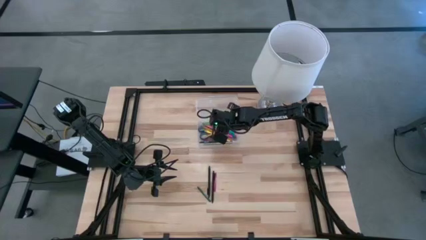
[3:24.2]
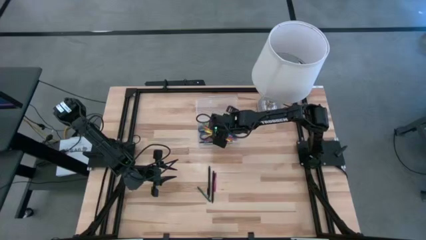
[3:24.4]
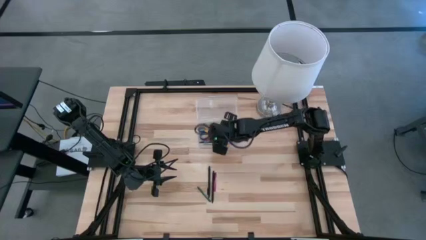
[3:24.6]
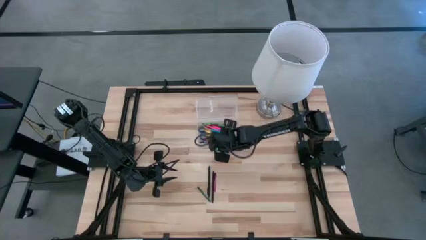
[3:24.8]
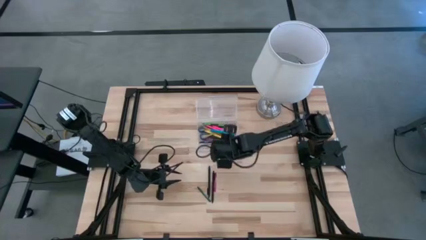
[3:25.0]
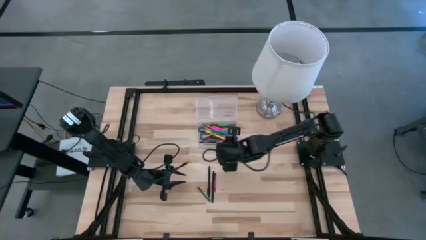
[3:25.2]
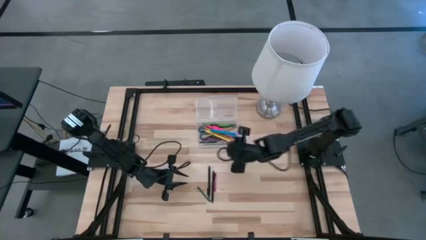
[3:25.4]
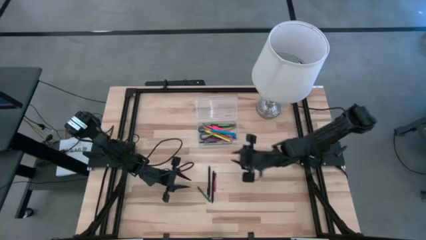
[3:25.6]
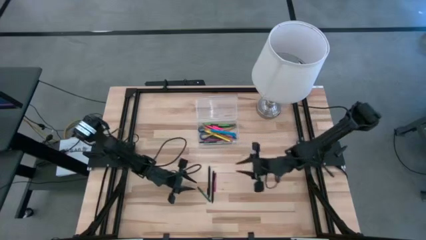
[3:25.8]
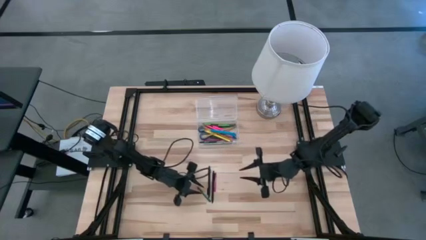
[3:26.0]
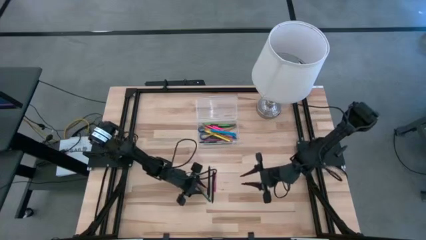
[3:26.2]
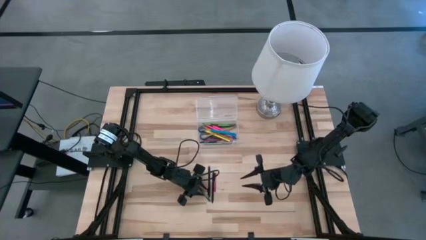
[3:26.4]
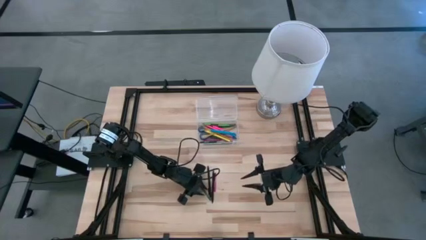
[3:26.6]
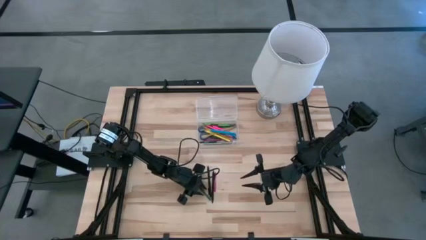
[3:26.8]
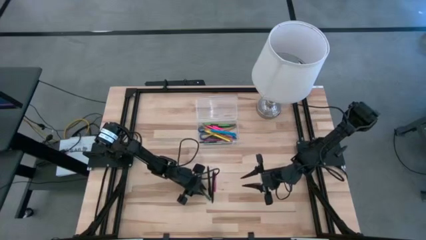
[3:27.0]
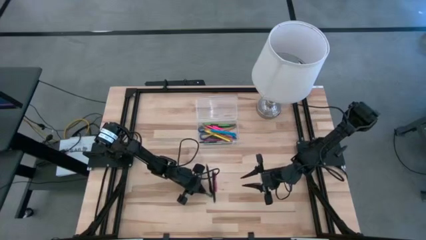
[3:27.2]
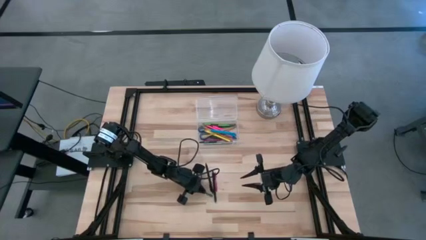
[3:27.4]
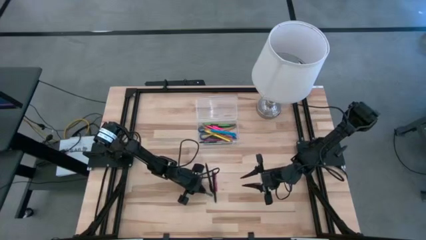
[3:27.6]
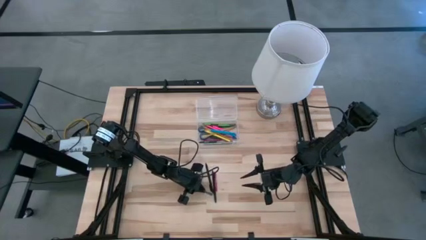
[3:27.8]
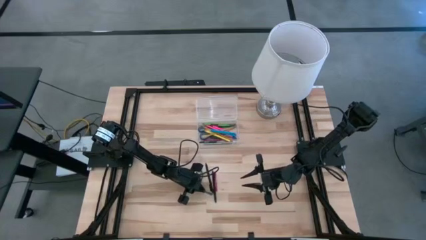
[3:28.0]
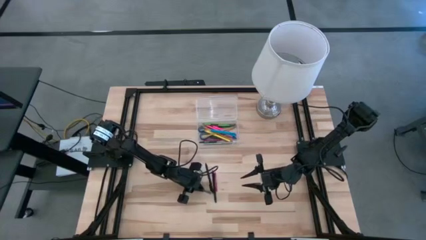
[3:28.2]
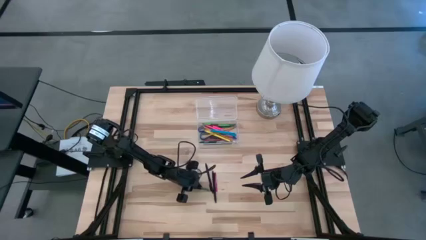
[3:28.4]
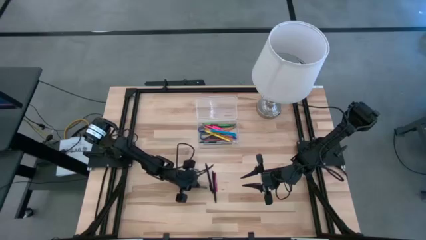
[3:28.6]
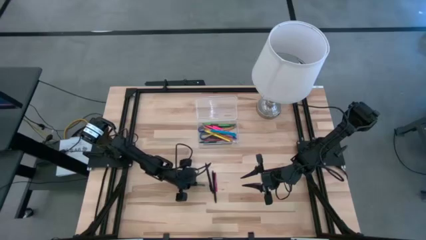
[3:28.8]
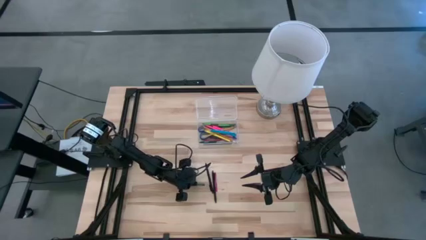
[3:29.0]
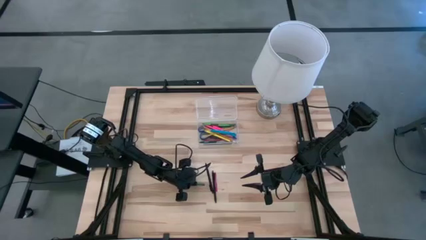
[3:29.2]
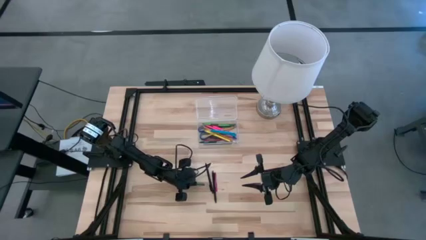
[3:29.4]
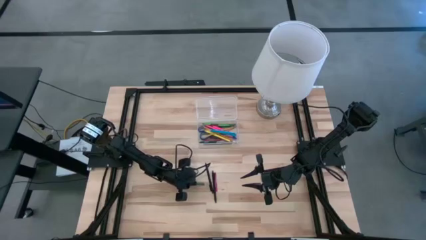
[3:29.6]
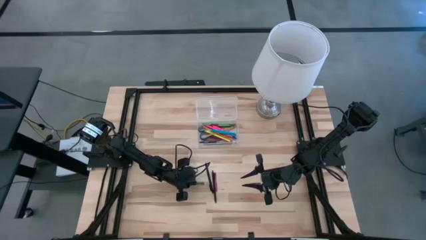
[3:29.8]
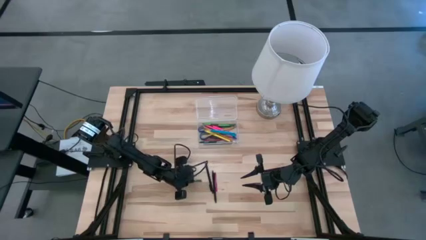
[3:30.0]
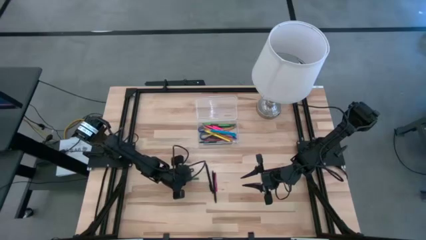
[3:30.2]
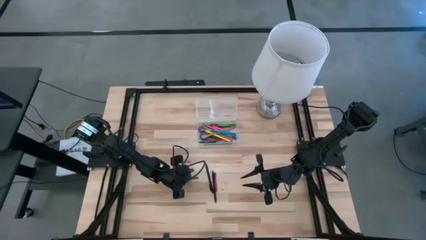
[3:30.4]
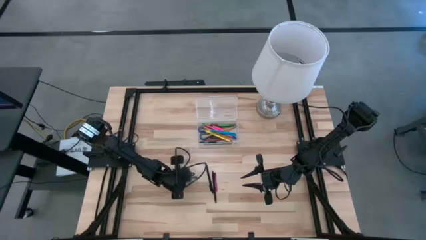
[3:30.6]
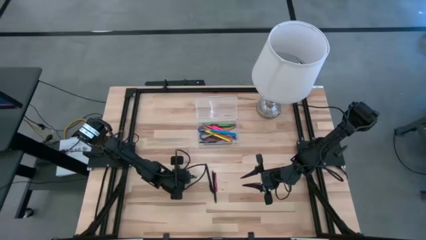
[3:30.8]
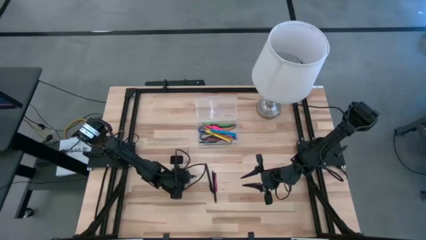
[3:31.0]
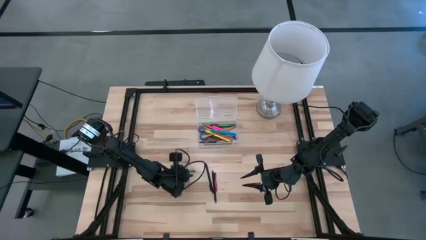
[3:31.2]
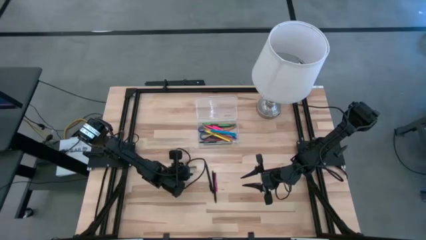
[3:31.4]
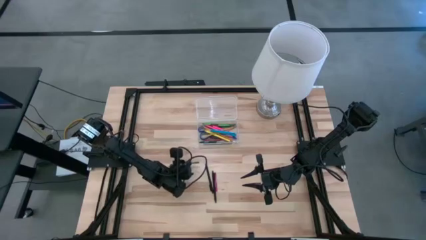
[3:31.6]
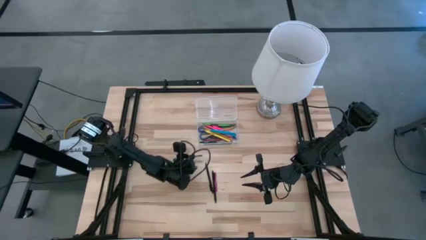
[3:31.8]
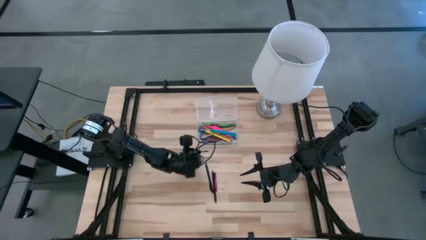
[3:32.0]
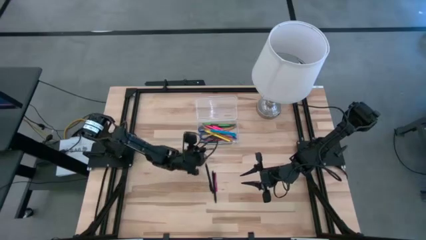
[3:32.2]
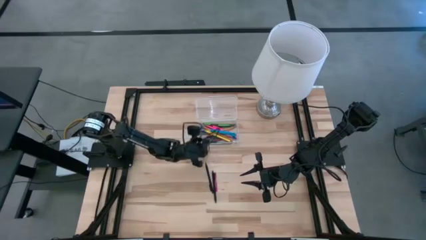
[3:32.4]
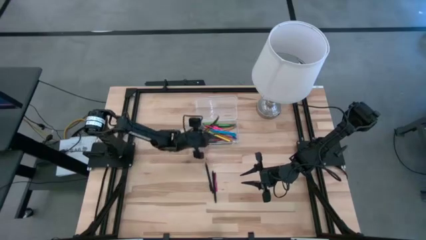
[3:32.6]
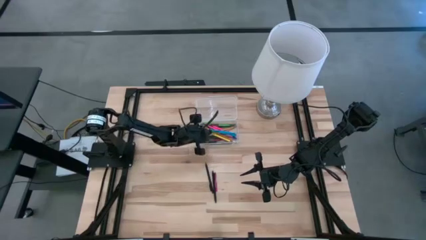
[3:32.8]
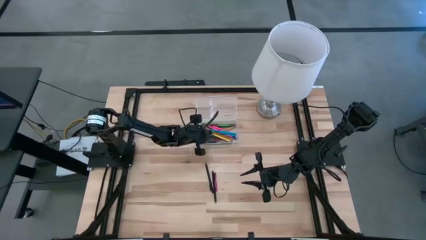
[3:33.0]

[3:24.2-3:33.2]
Task: Pick & place school supplies into a supply box
Put the green crayon into the supply box

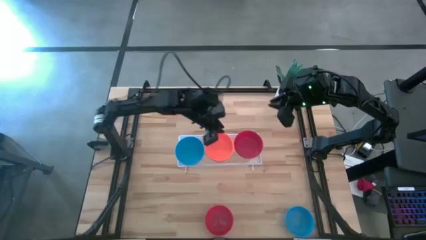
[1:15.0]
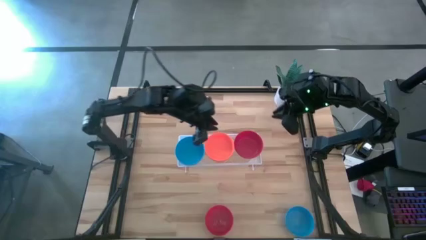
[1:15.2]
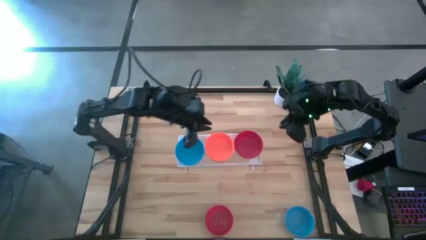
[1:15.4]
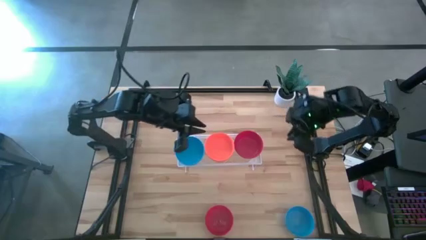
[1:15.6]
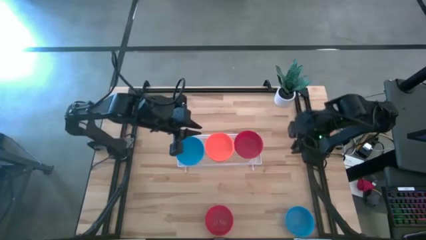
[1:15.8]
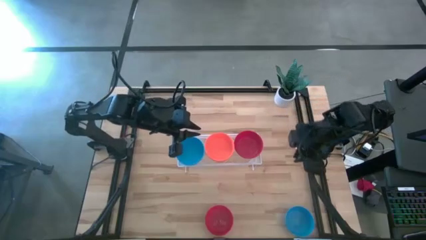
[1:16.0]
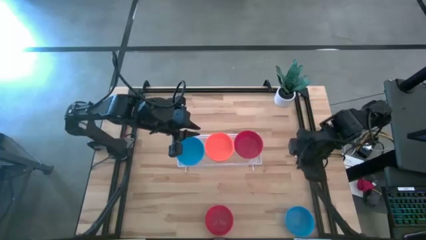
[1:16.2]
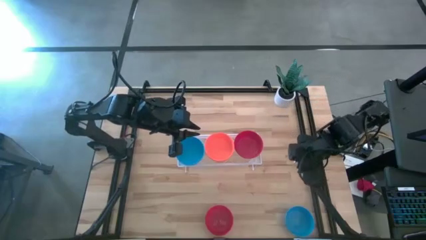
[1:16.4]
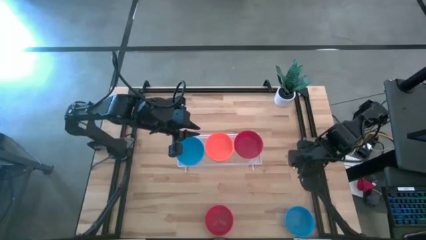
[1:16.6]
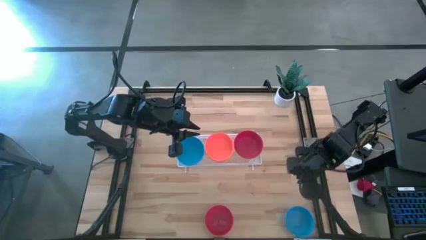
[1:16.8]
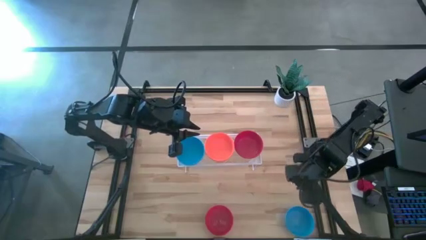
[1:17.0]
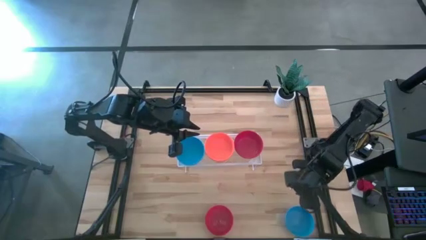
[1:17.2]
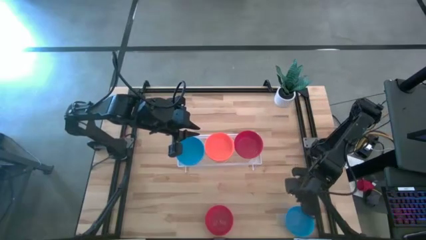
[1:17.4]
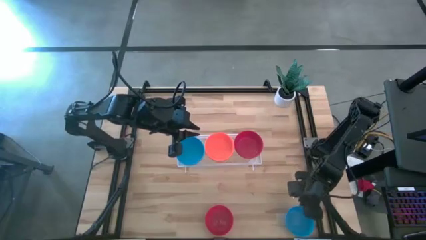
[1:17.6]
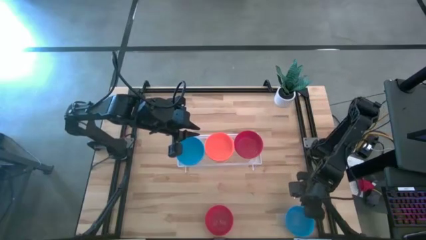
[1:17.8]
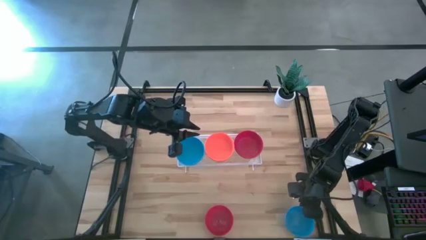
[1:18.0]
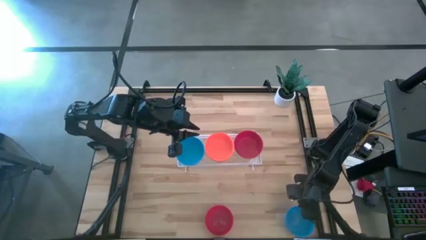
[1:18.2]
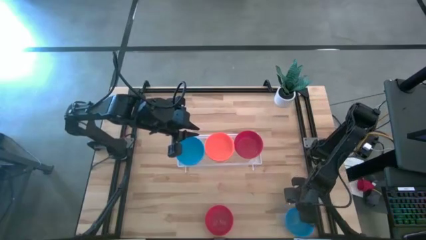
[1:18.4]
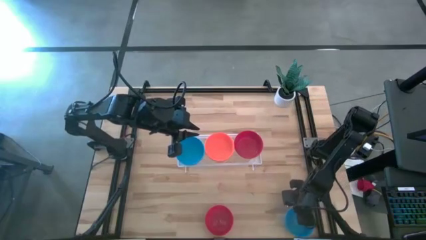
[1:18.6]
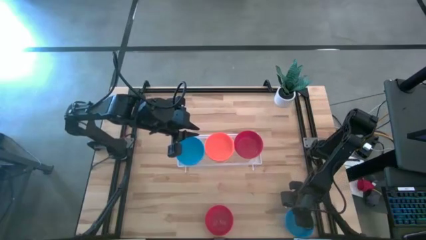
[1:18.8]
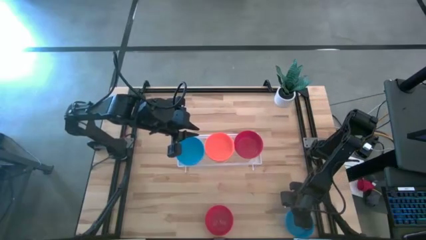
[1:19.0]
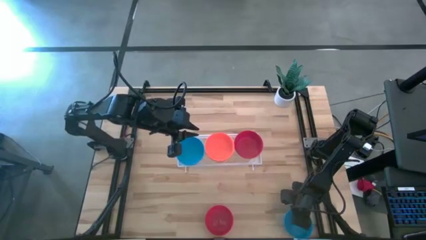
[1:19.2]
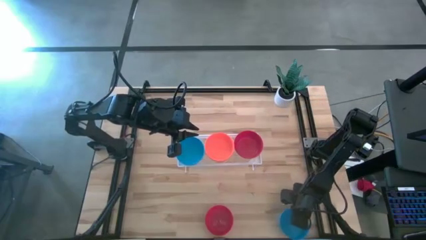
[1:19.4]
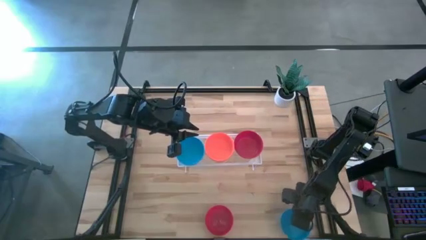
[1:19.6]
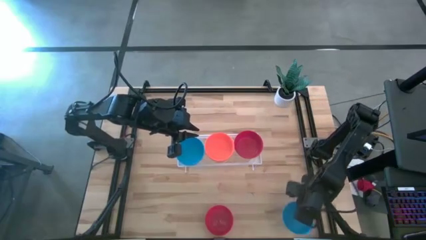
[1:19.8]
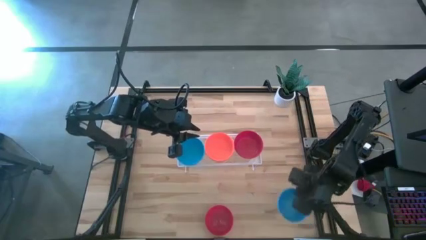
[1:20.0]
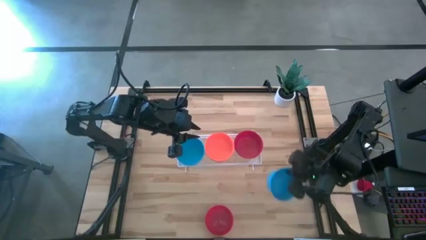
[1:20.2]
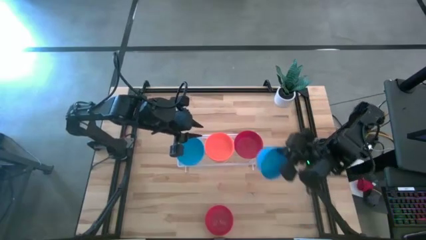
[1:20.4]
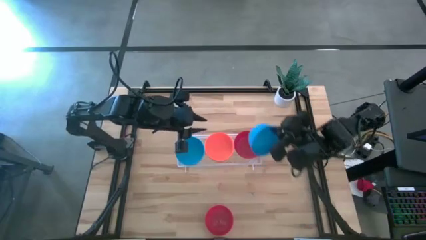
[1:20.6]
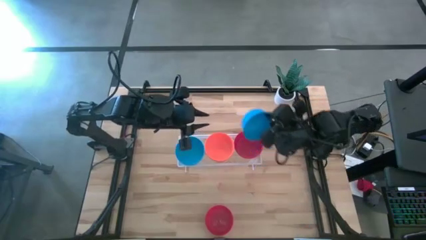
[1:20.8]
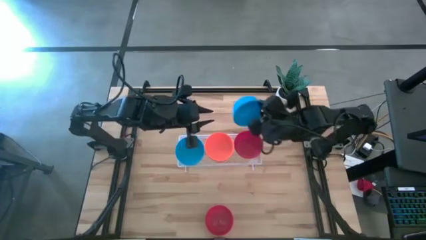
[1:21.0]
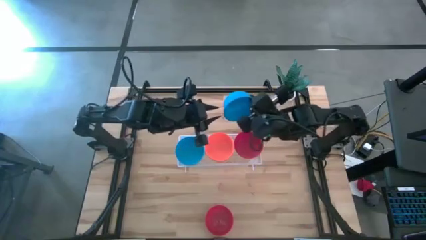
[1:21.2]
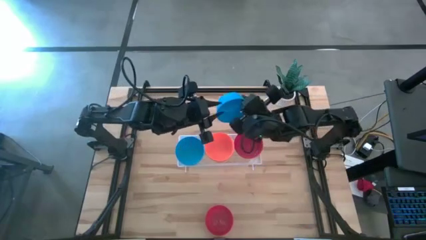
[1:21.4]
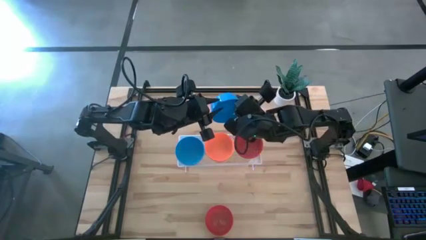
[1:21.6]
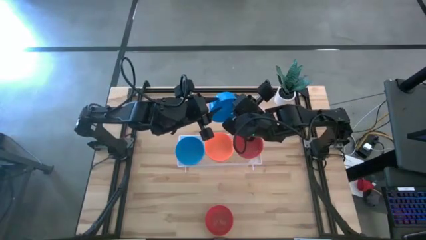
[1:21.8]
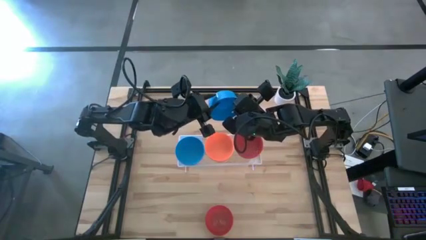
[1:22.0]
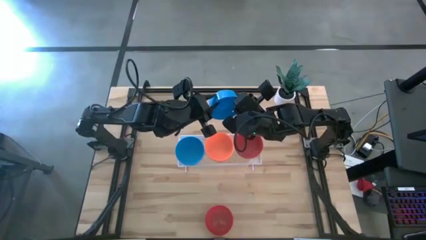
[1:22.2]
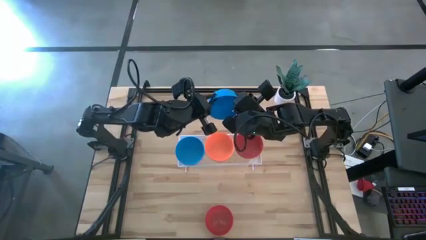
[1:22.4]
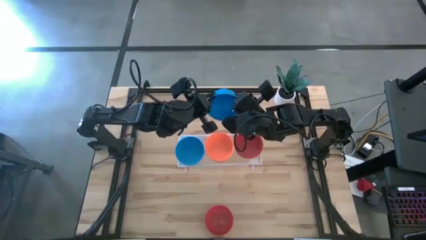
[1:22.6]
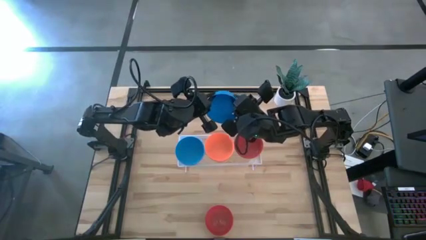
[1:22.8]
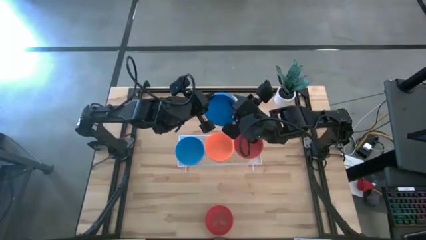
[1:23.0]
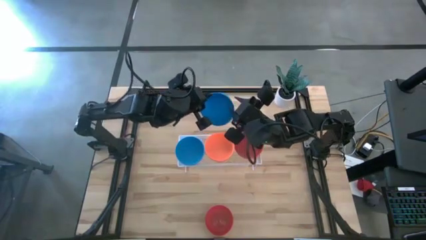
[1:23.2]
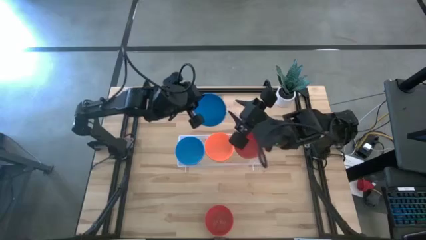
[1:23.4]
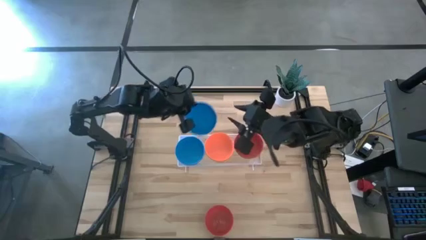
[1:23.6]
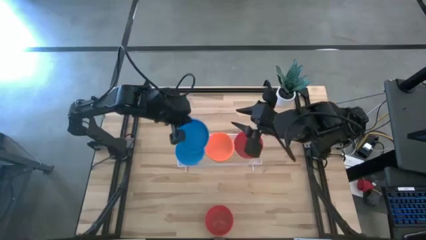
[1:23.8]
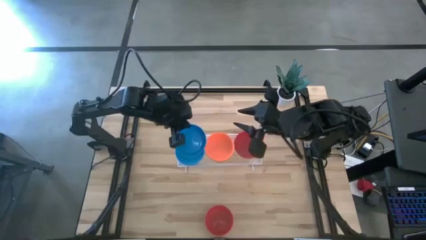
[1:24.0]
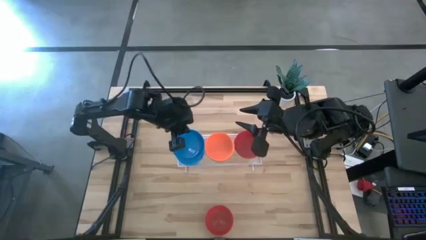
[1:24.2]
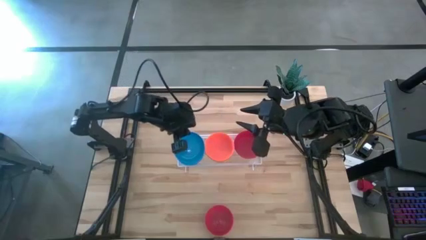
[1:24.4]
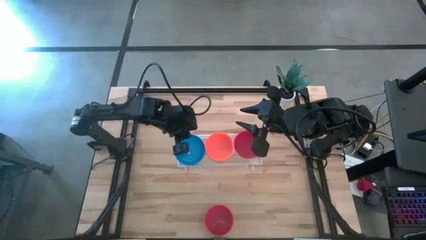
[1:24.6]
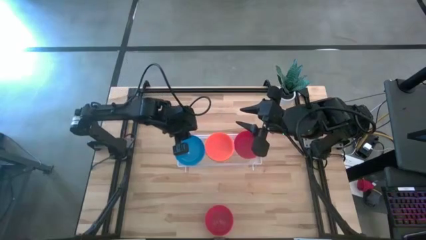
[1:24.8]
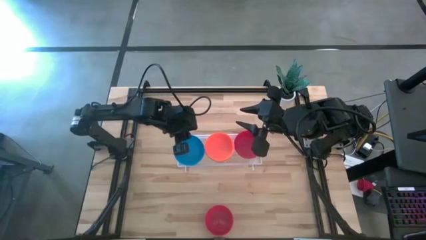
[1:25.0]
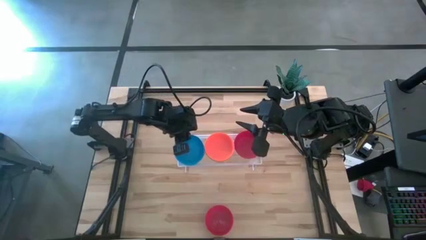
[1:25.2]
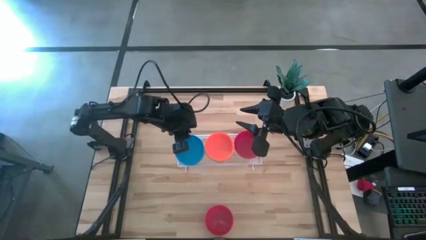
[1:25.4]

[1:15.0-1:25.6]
Task: Pick & Place Mini bowls
Stack the blue bowl on the blue bowl on the shelf
